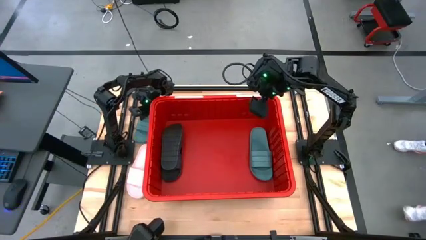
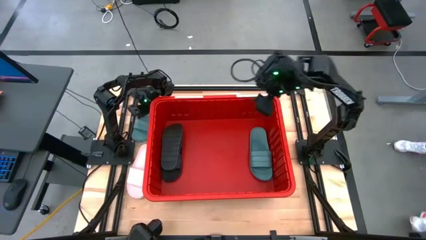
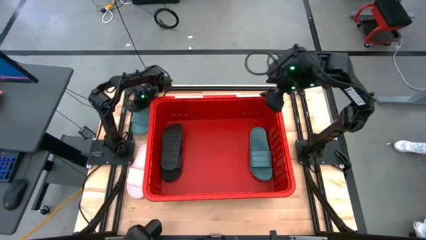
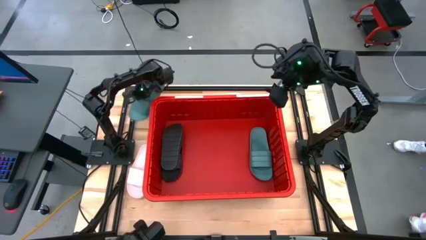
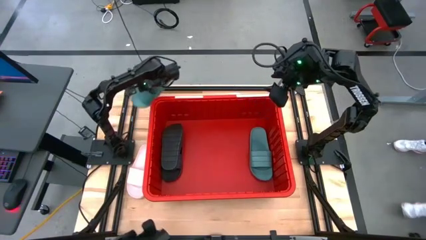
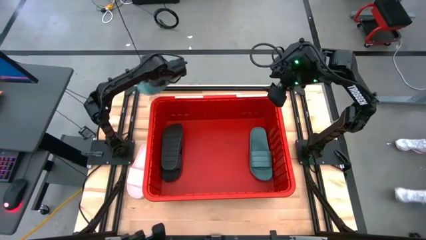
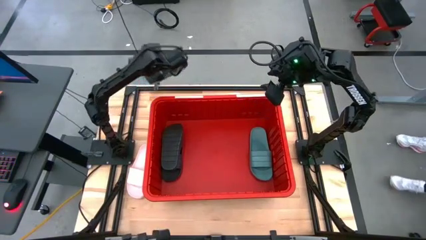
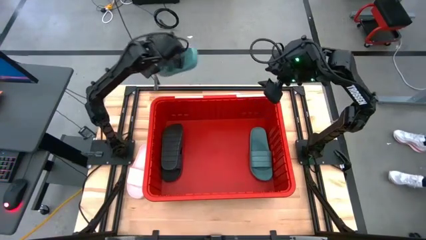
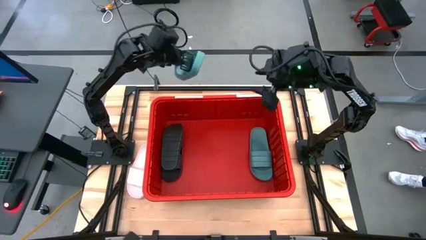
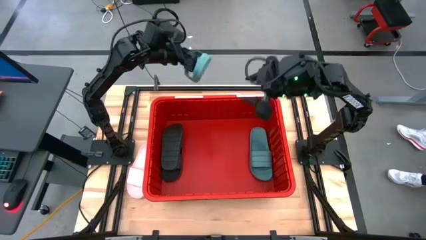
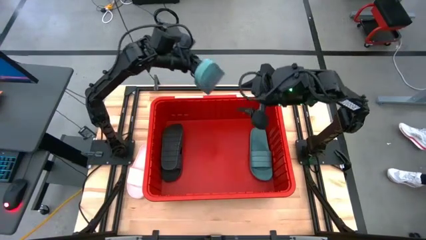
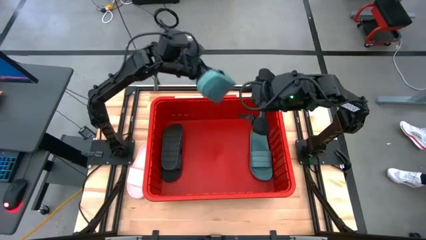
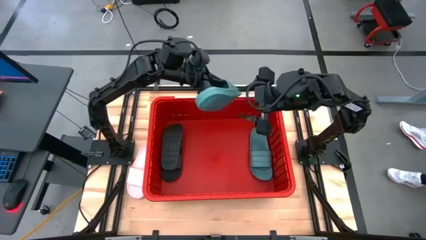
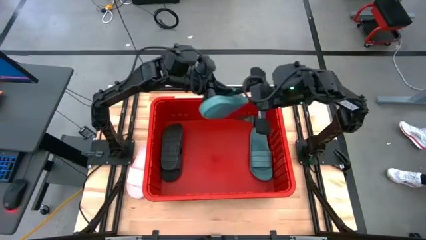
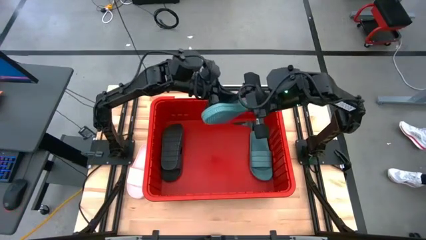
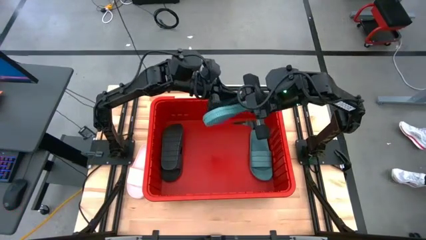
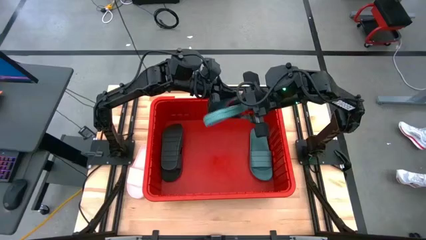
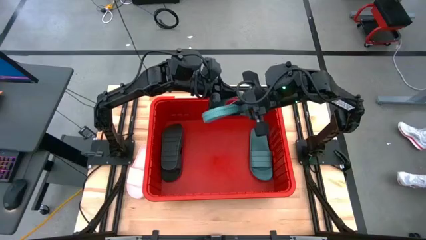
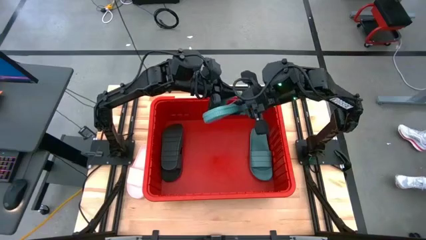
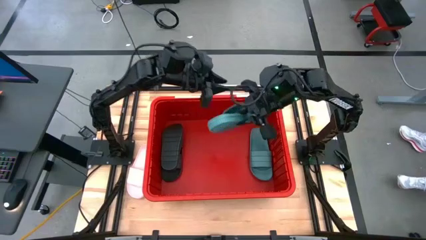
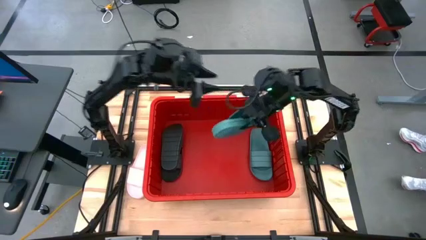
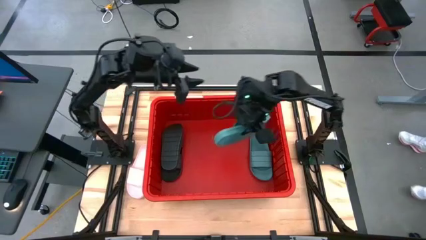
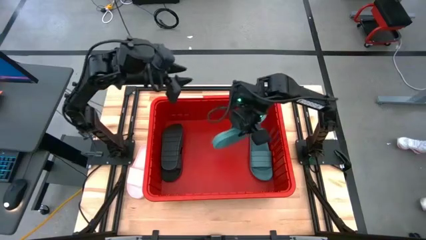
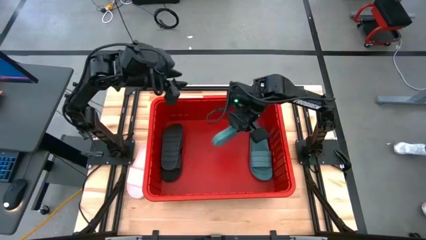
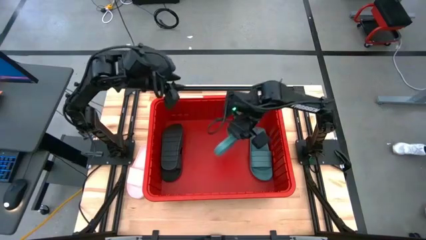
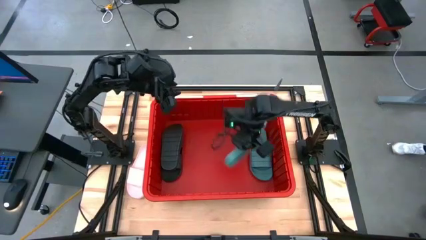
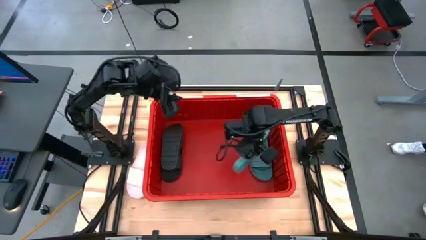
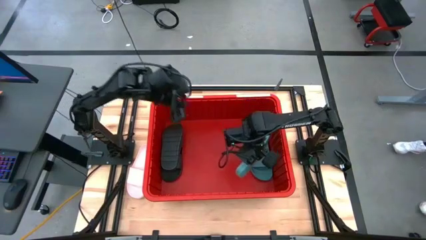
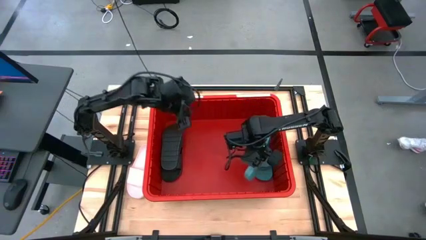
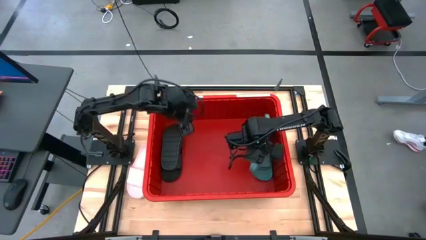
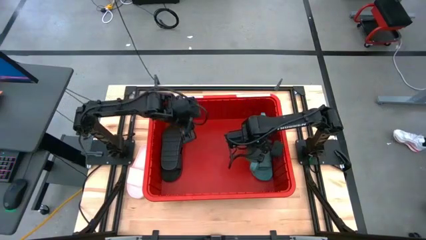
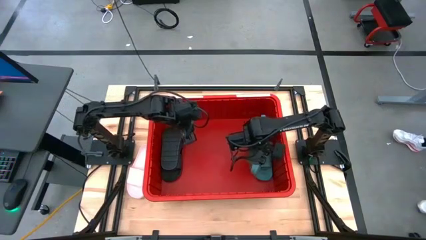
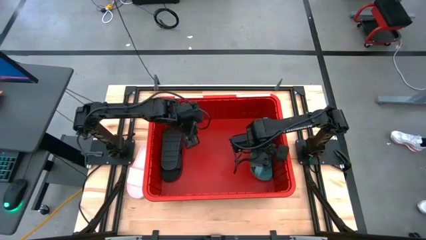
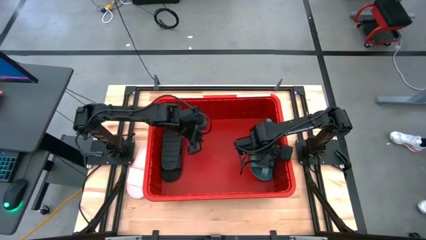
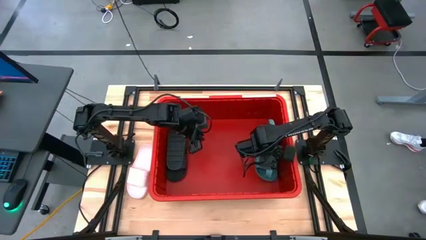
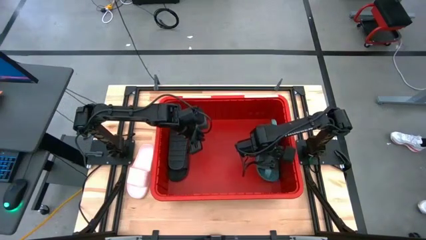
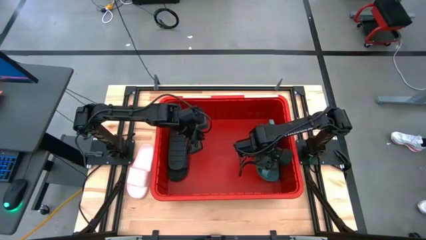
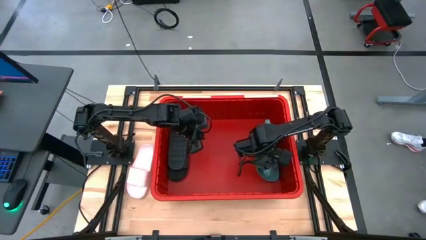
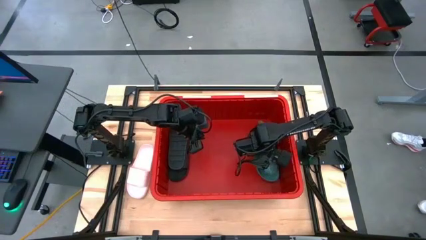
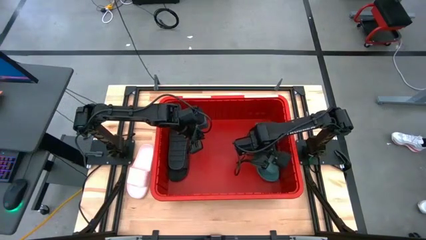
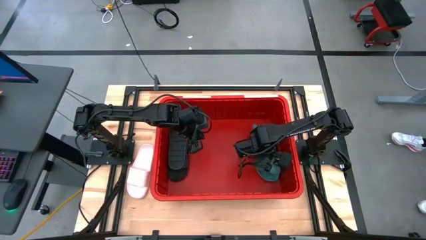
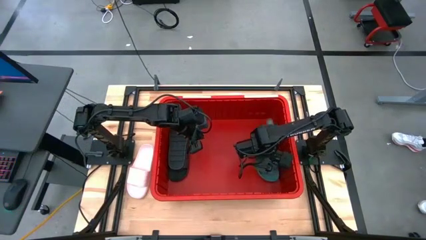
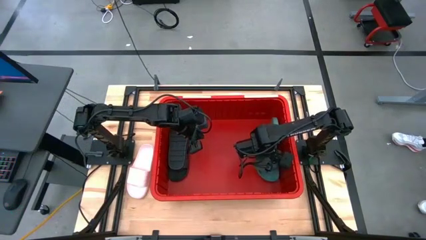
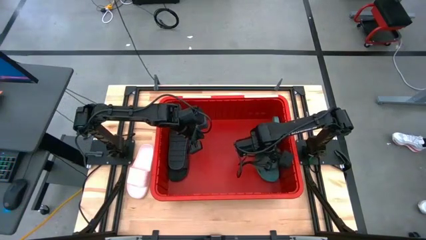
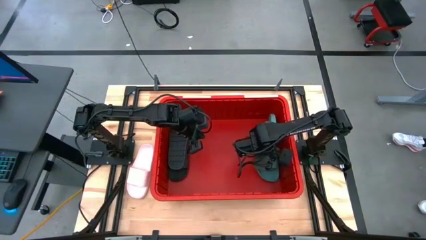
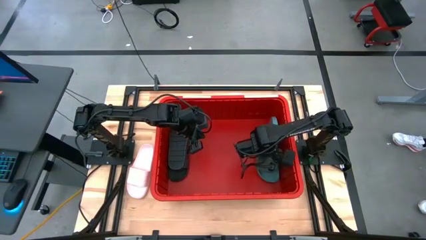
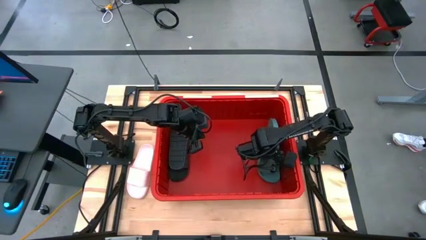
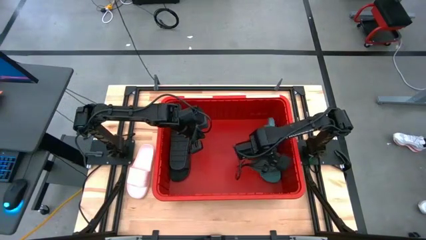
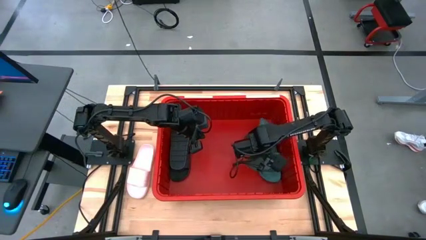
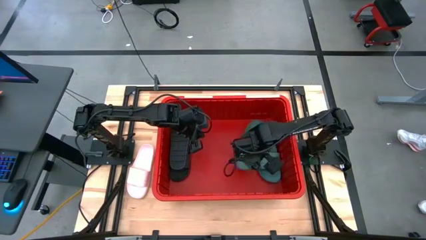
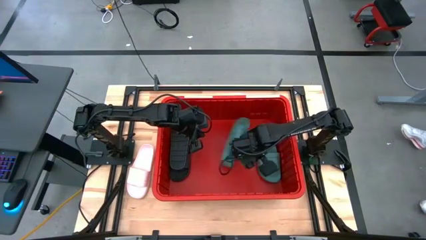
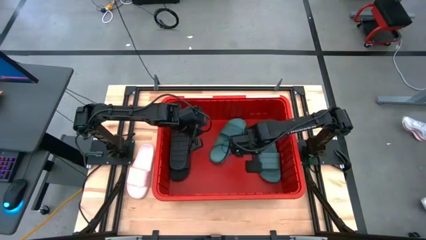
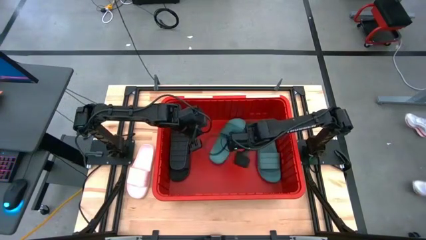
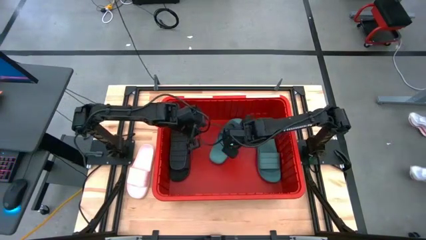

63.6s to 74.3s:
Task: Pick and place slides into bin
Put the green slide on top of the other green slide in the container
